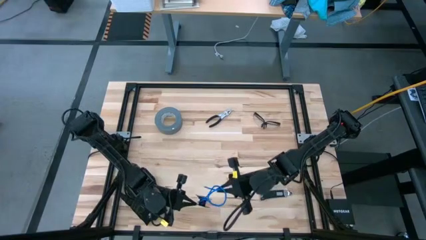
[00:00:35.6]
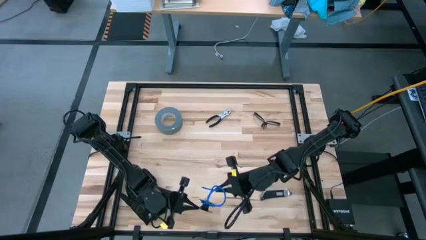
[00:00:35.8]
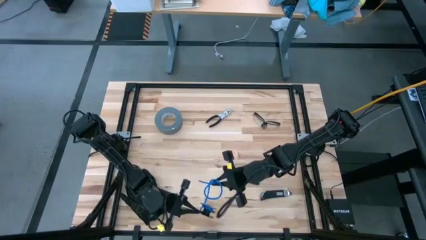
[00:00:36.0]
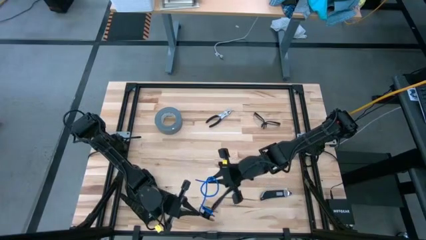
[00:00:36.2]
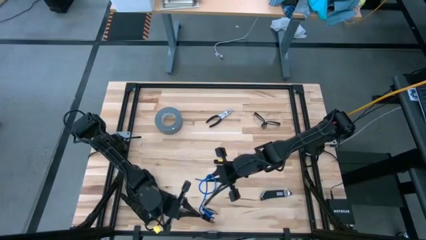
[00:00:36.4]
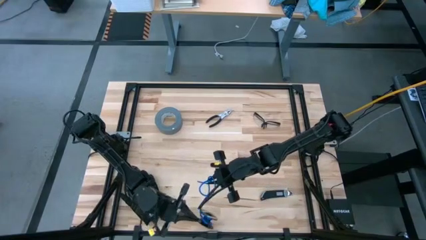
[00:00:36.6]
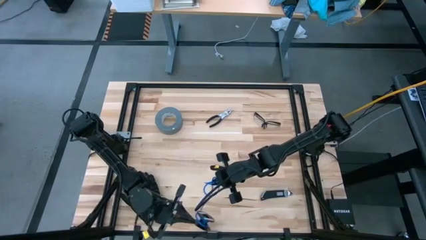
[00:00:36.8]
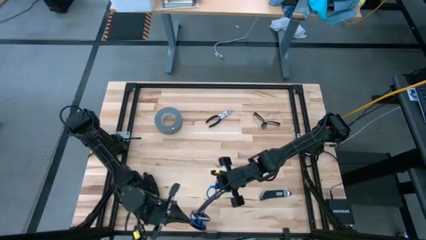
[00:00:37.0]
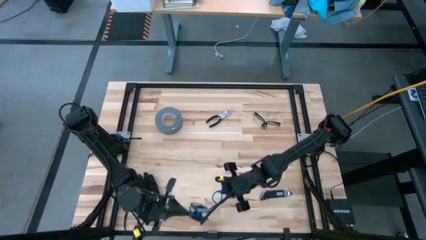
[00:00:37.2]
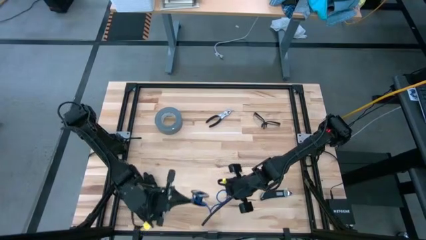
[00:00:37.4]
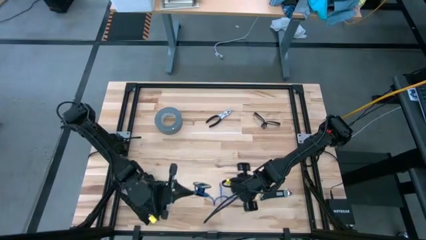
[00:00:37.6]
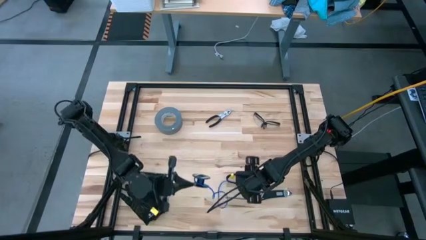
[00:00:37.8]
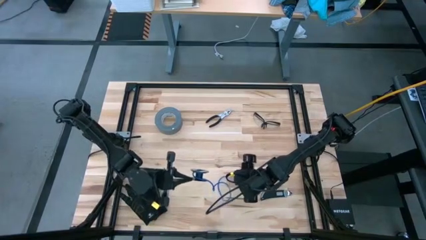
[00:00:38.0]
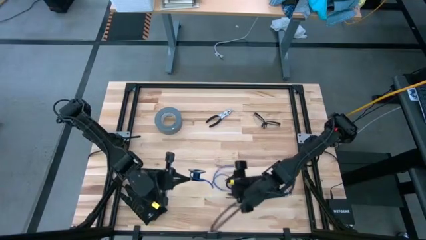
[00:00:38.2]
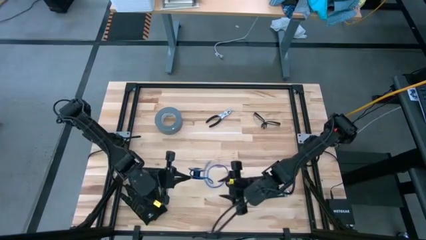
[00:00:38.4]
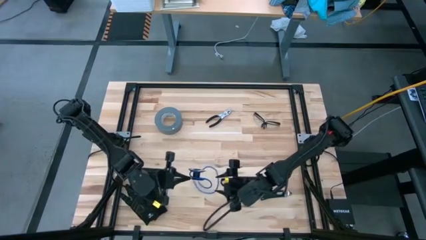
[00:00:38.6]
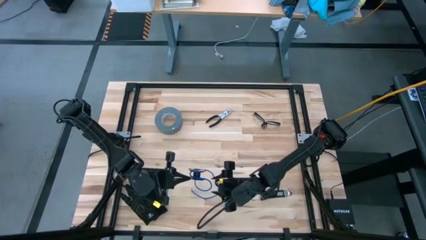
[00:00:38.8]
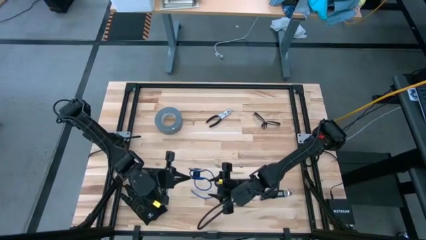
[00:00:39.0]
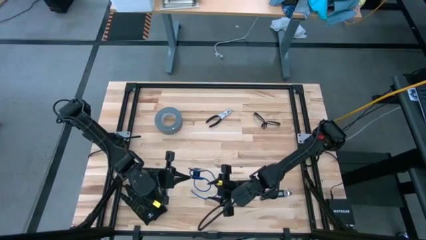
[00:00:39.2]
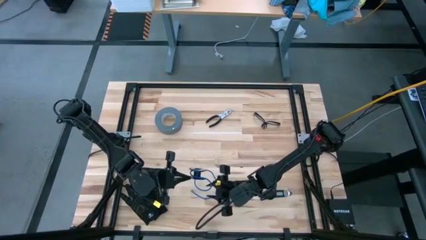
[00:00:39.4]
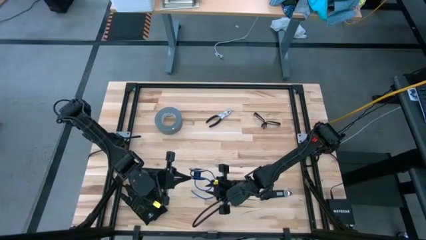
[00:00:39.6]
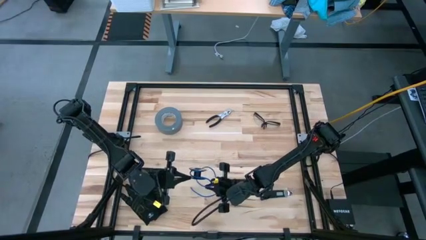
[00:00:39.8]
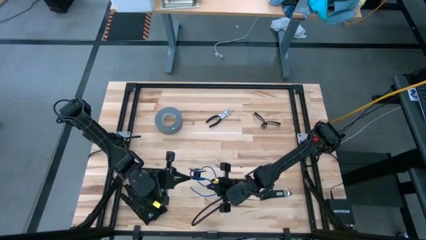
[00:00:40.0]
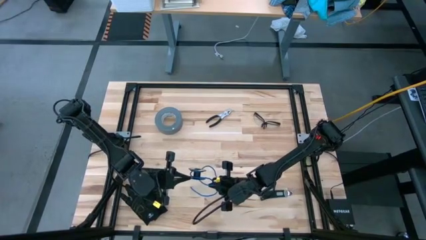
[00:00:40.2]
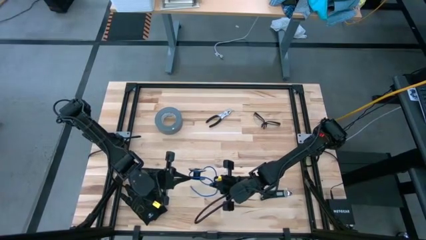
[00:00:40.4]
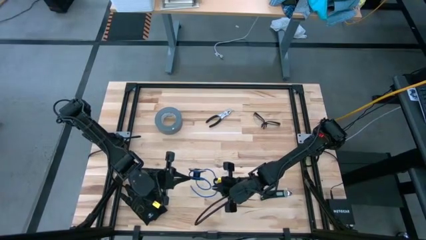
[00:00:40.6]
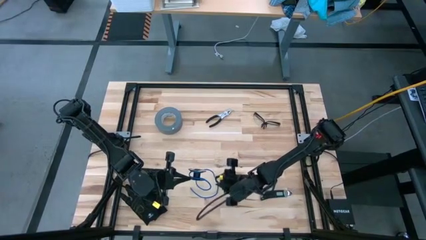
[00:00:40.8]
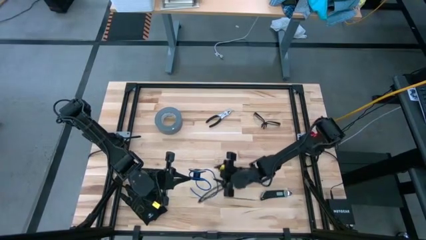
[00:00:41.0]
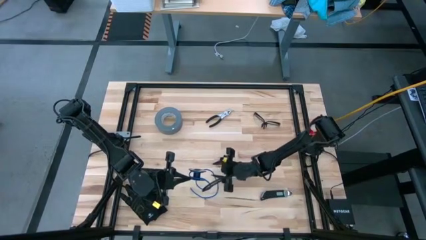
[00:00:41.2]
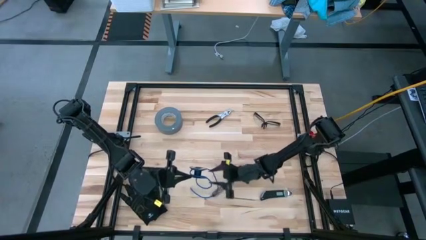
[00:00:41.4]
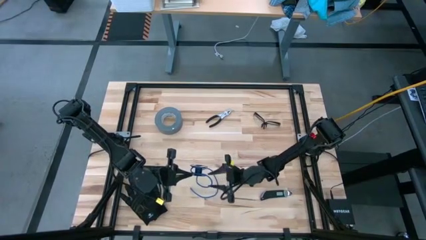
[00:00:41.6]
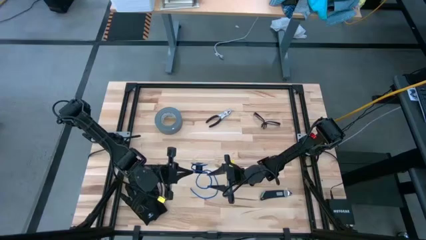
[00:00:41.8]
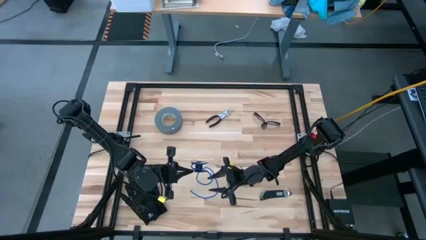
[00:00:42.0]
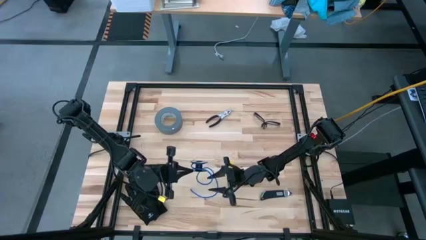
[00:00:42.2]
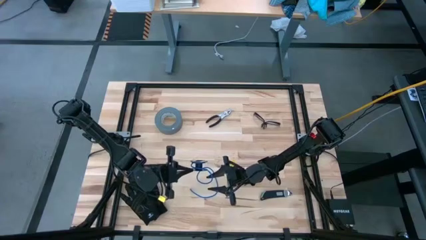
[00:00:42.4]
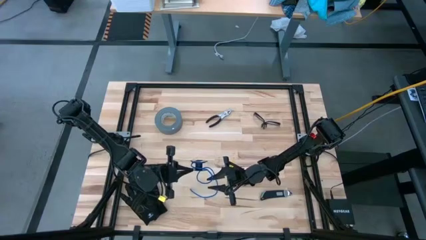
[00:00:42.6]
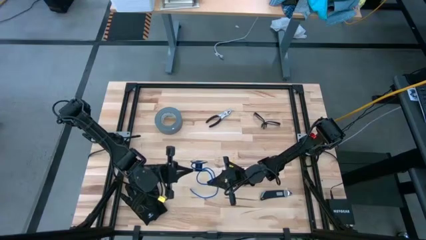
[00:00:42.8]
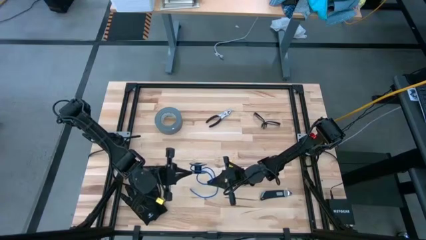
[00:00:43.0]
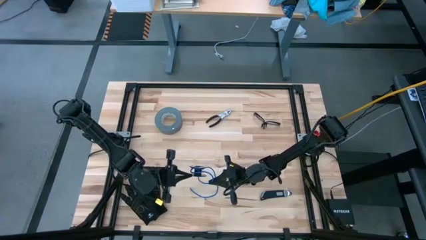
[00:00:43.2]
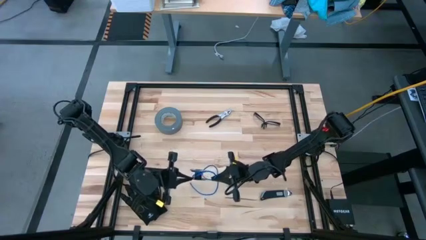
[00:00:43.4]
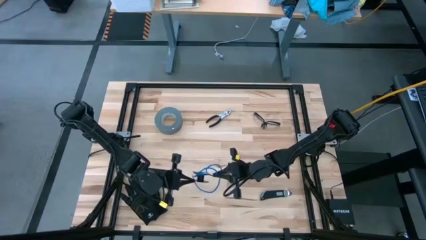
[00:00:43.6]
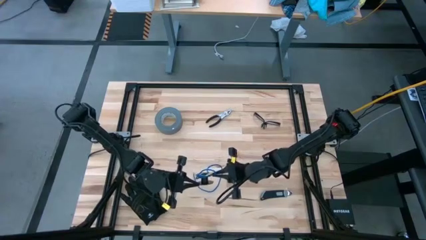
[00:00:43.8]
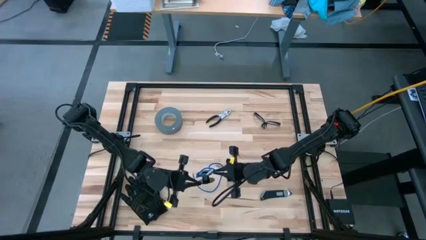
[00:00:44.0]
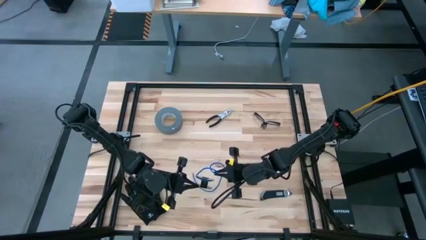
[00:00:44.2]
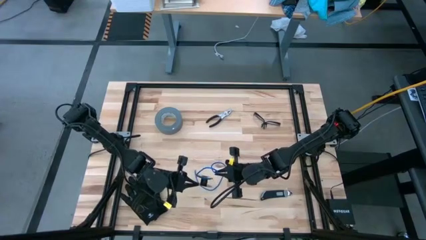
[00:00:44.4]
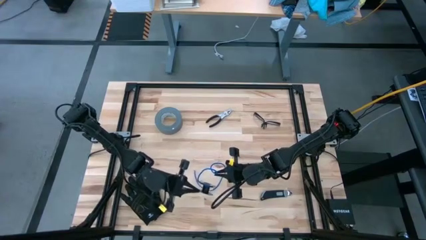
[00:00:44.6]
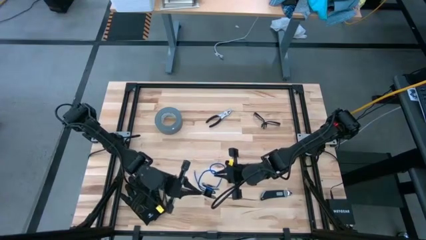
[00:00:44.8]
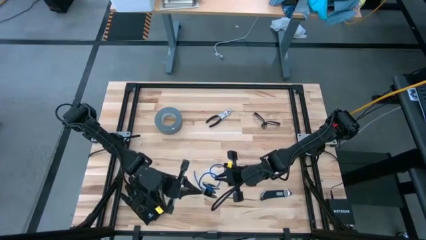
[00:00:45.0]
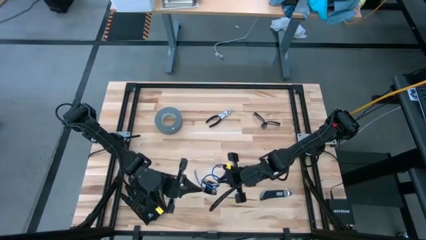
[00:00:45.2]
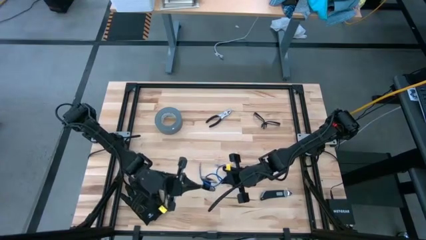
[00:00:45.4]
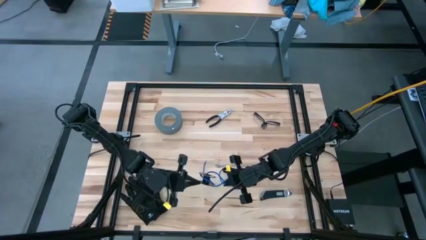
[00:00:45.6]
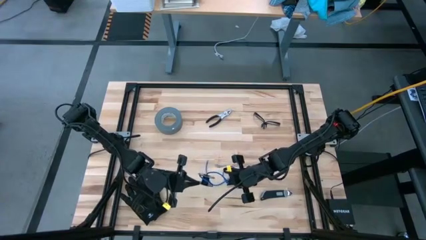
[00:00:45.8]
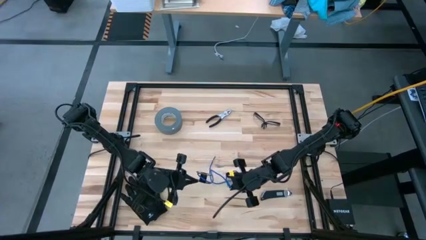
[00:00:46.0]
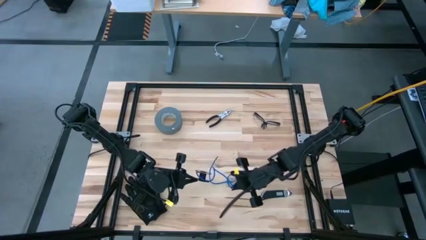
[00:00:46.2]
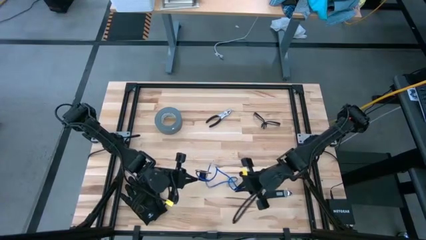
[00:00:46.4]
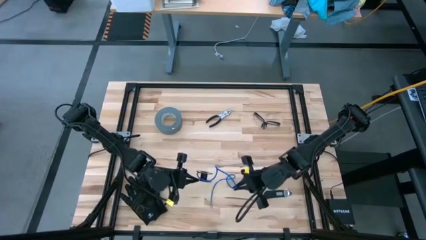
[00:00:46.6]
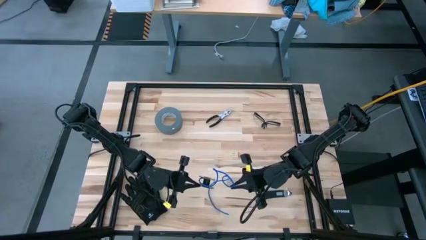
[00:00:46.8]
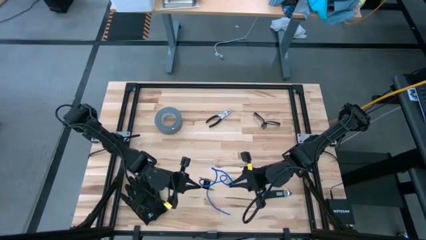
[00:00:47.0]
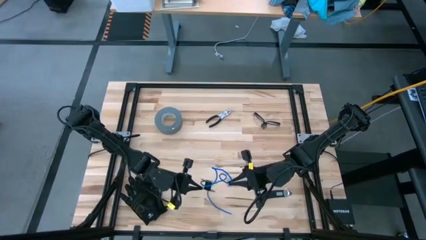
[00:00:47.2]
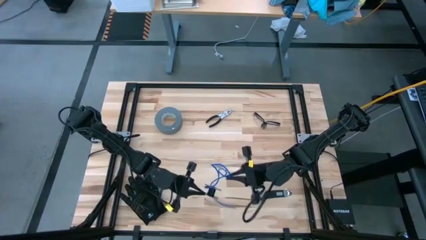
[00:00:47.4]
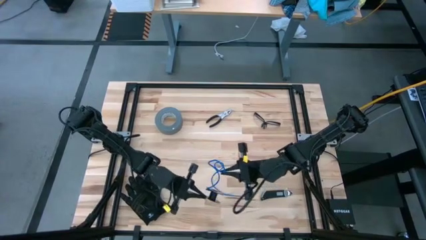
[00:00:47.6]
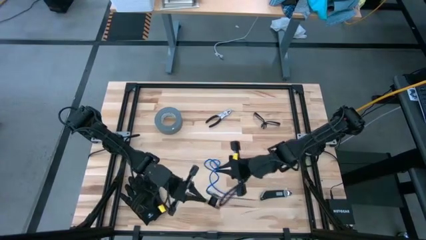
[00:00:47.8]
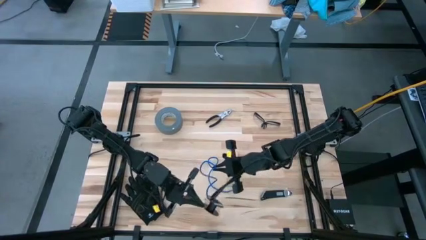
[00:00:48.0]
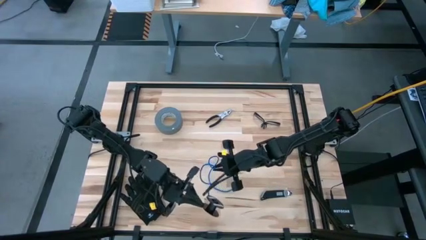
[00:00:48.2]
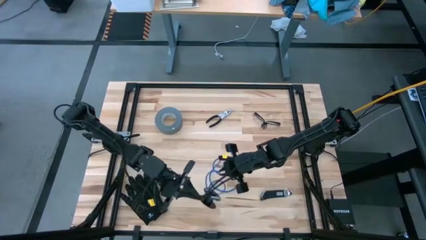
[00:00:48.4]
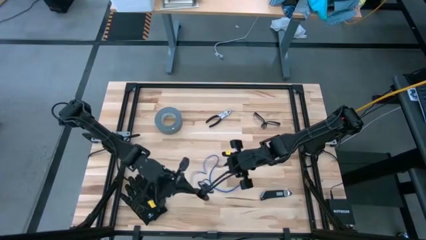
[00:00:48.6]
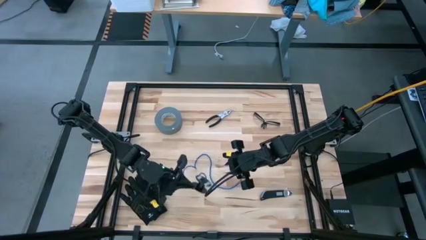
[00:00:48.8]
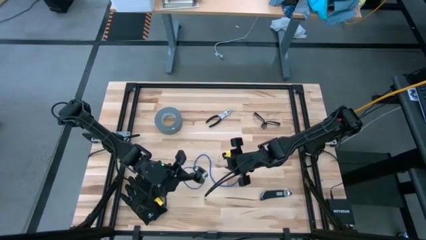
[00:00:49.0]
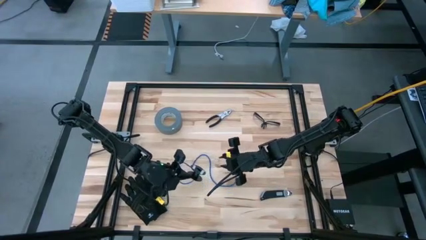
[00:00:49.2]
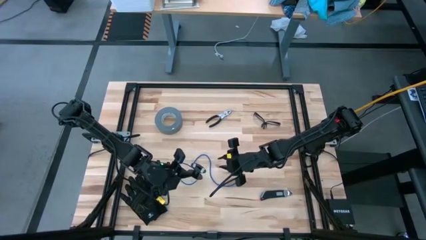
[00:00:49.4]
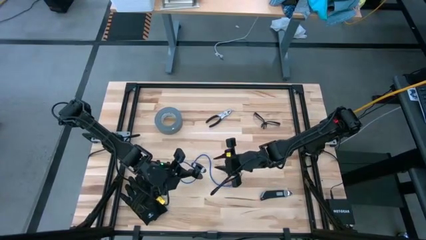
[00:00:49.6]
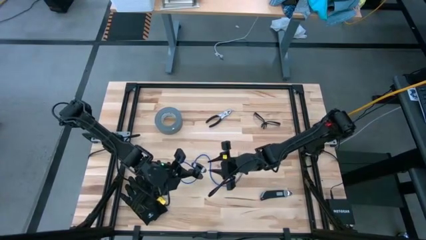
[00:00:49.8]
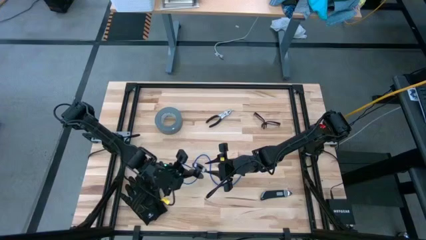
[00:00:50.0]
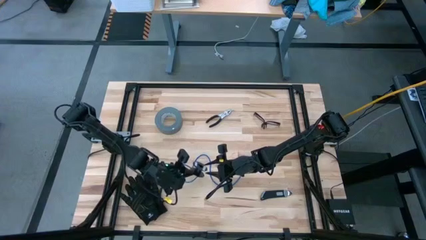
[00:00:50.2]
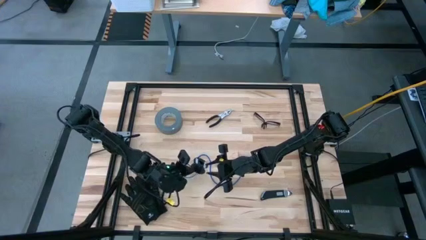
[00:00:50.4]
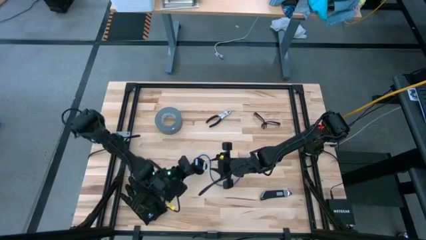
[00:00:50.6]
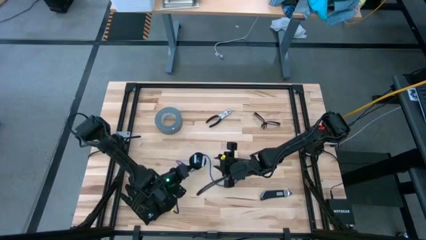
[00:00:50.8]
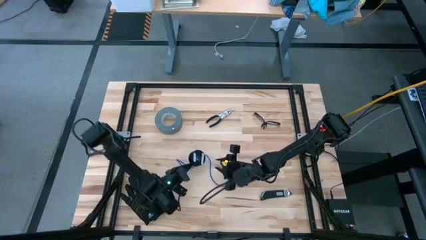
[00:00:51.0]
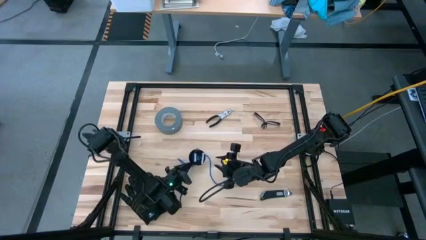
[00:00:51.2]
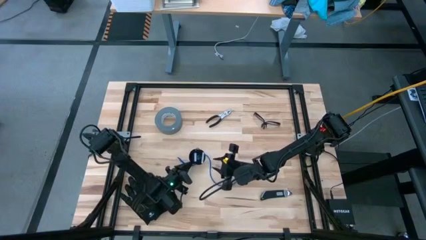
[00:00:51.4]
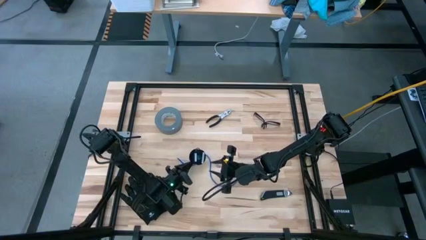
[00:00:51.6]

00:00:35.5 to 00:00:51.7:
Task: Coil cords
Uncoil the blue wire cable from the black spool
